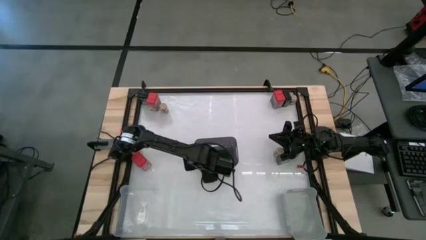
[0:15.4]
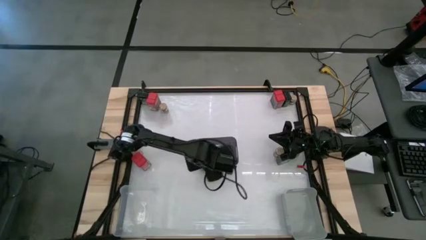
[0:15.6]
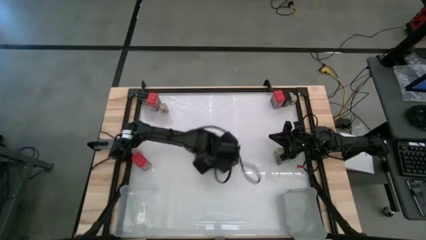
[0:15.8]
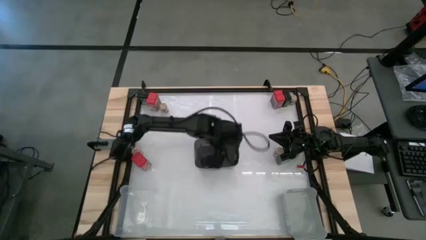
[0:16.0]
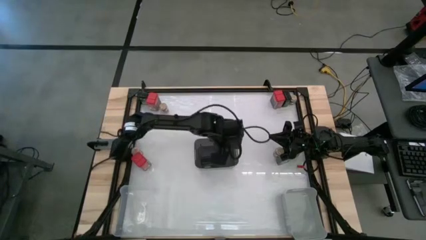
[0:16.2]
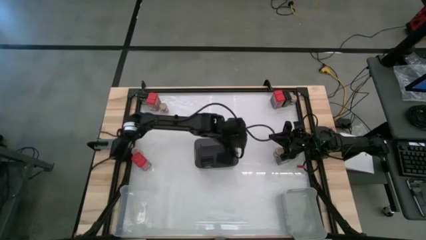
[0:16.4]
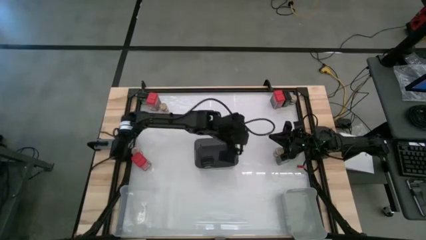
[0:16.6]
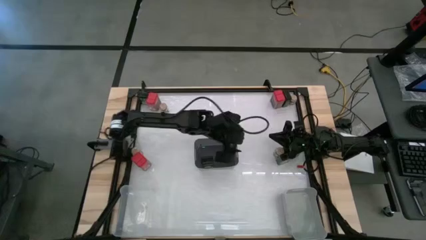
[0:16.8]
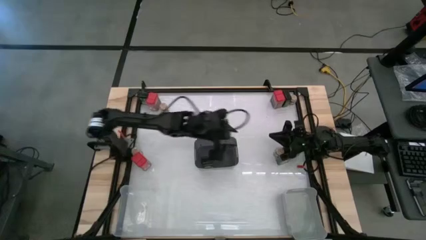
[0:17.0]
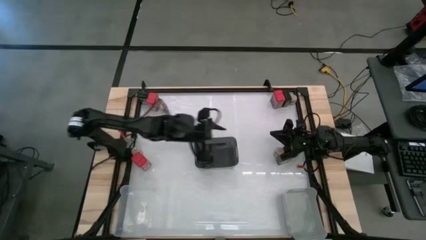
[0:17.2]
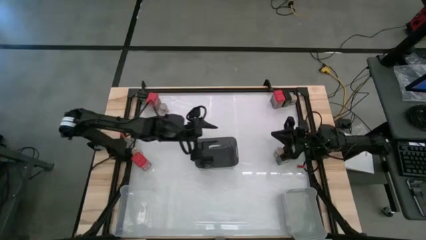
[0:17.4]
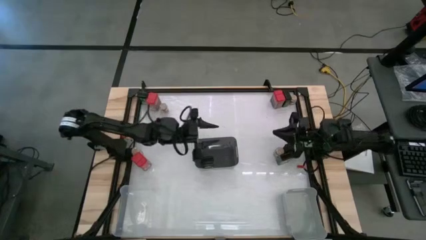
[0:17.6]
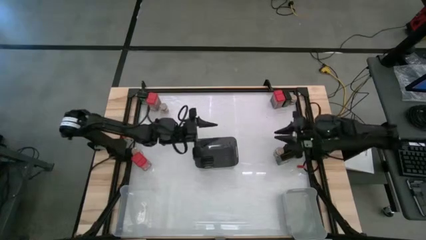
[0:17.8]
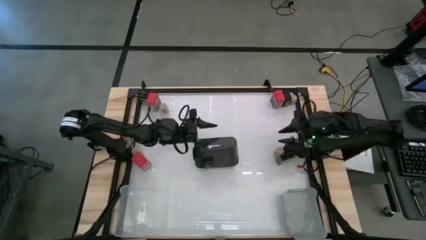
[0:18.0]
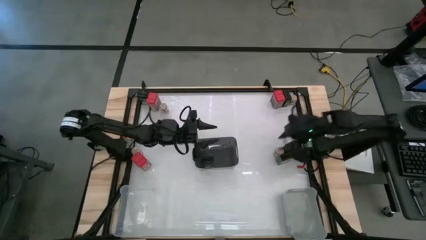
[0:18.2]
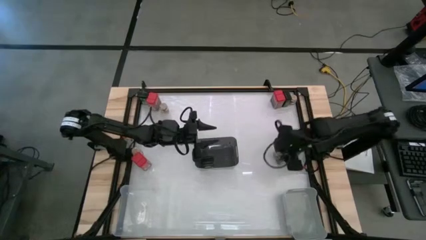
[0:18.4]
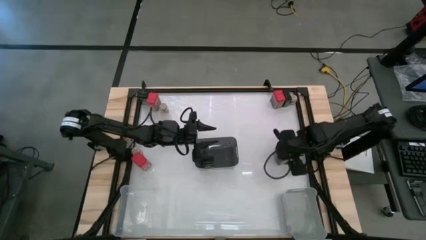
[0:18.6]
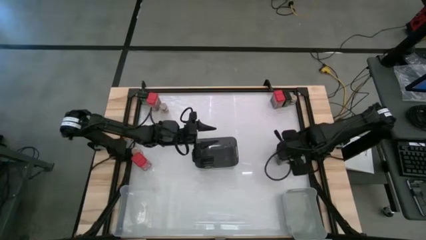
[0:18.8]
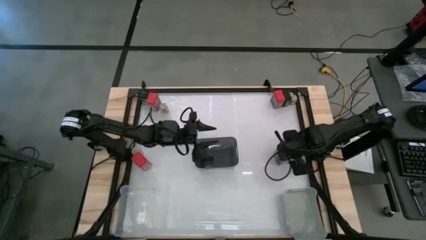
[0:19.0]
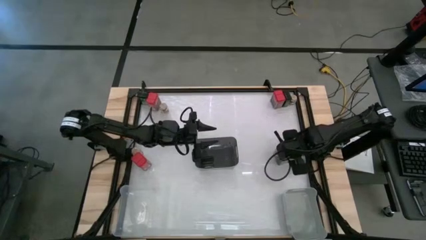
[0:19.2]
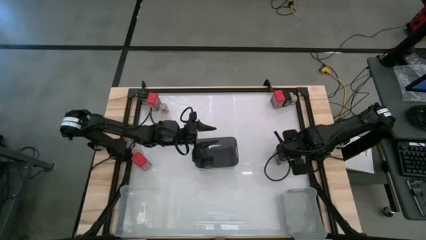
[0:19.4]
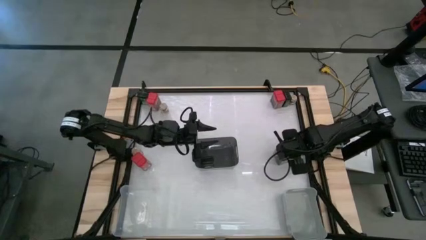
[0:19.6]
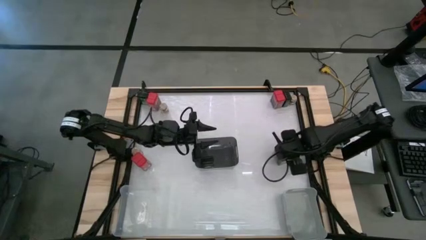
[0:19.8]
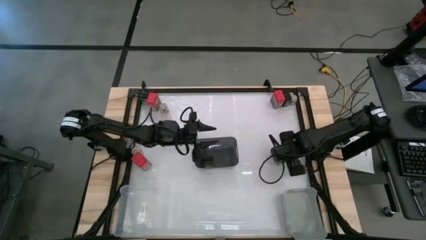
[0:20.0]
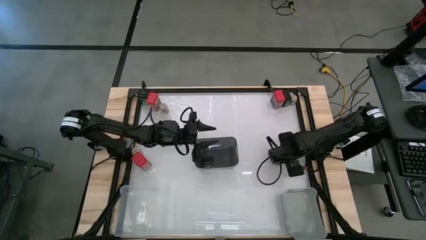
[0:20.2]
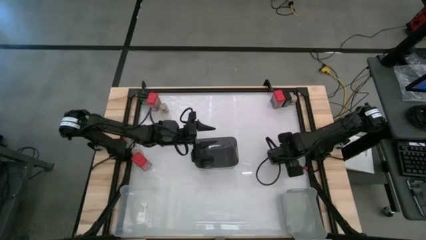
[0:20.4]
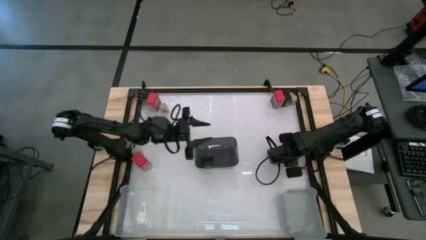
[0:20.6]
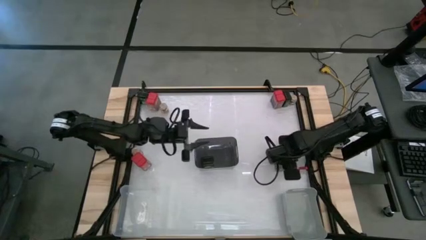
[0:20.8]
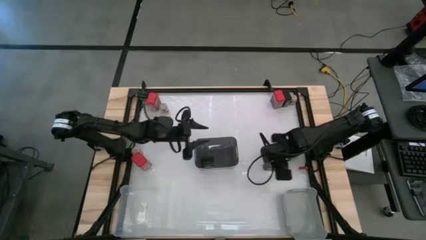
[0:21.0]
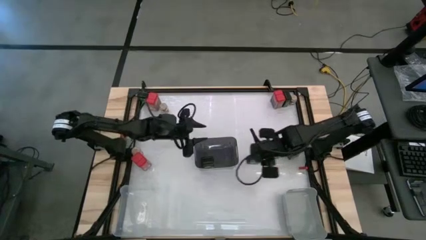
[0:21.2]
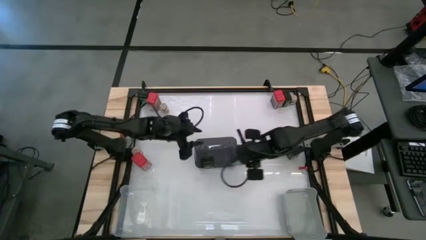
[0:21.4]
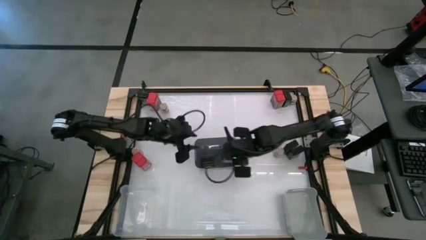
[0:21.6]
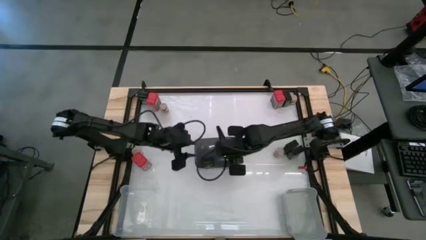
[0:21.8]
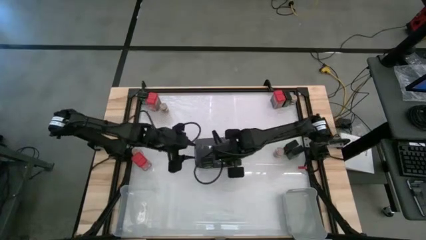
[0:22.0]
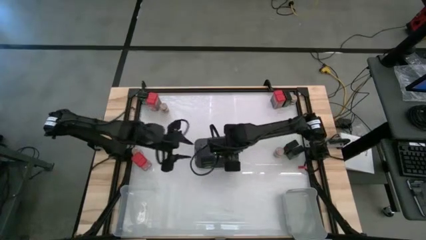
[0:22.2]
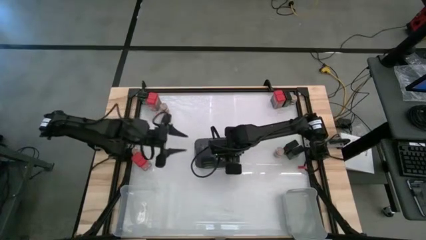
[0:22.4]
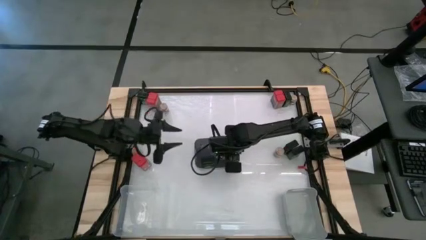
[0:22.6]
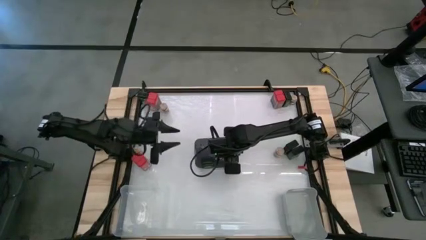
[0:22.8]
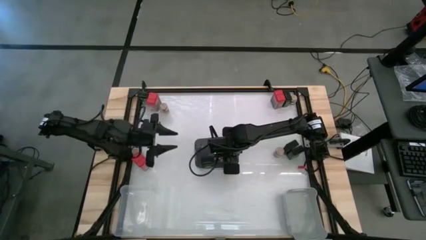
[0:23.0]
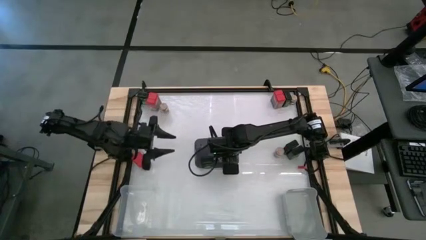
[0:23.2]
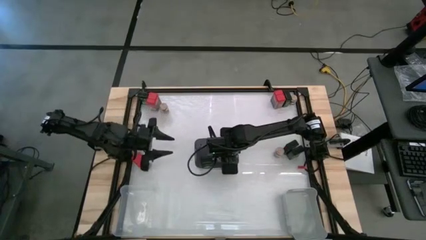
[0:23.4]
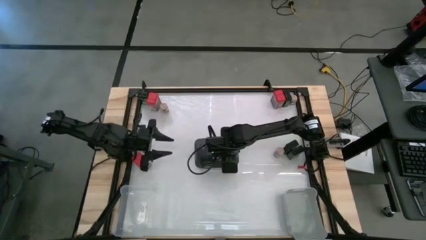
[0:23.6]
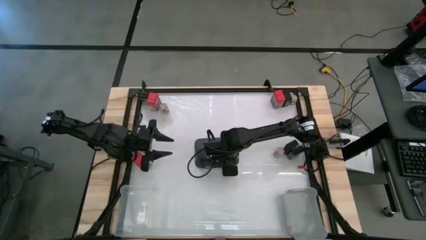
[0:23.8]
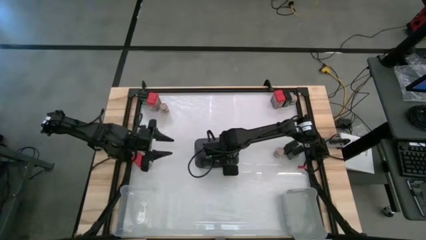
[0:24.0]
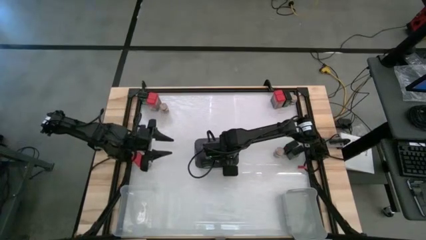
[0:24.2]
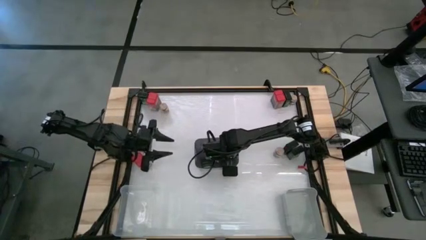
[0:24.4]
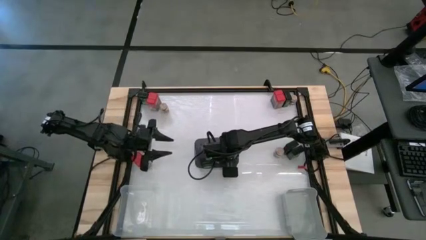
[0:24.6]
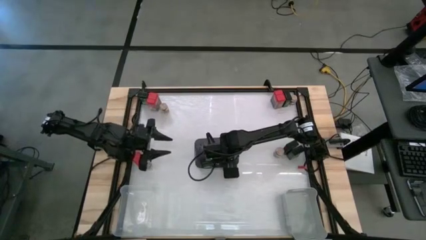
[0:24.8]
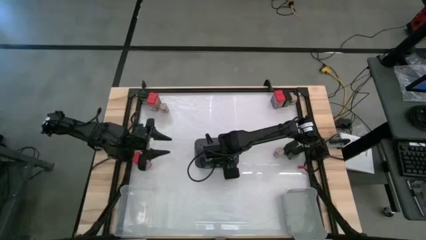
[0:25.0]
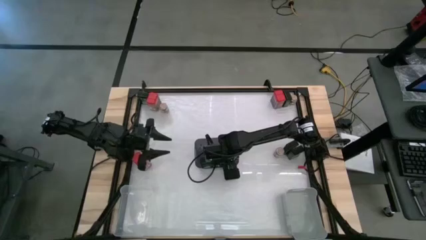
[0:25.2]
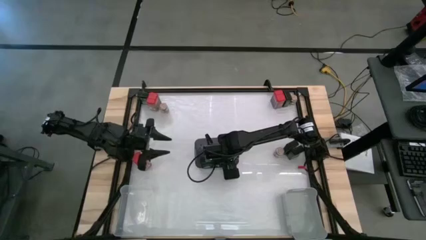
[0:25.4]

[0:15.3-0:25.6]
Task: Sort spices by type
Put the black seasoning can into the black bin

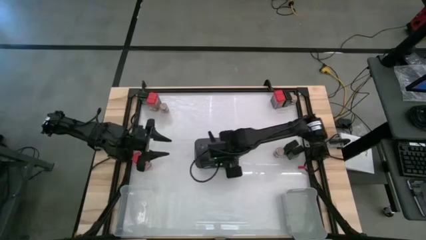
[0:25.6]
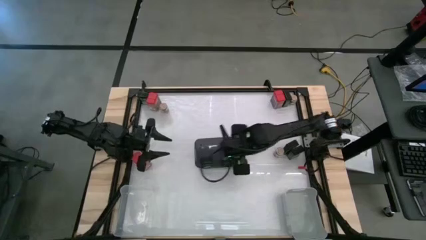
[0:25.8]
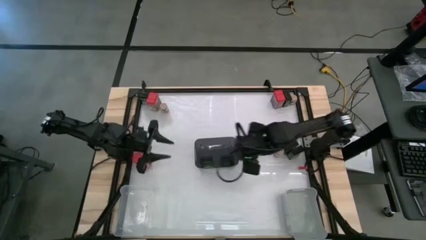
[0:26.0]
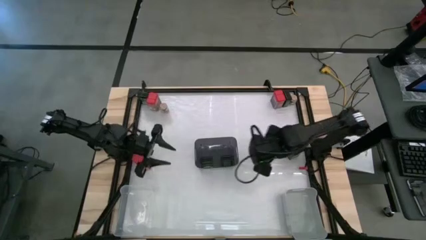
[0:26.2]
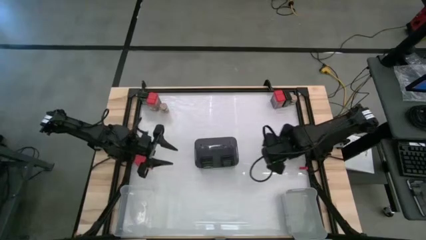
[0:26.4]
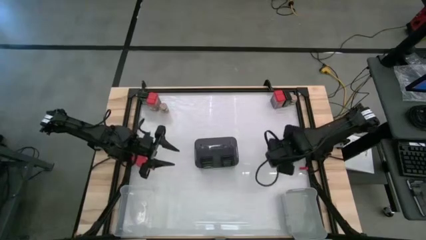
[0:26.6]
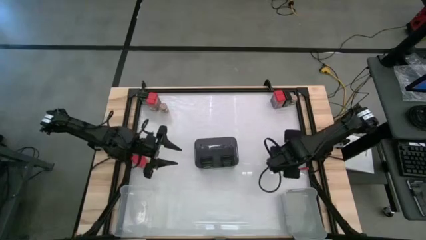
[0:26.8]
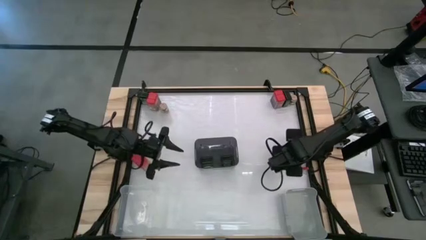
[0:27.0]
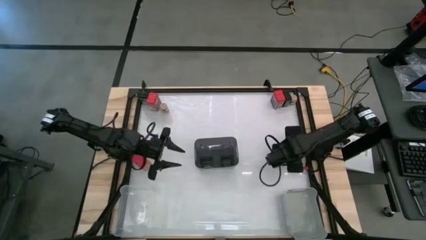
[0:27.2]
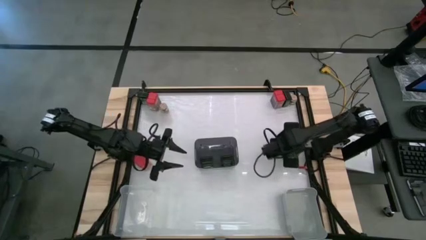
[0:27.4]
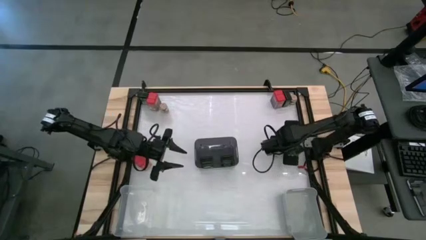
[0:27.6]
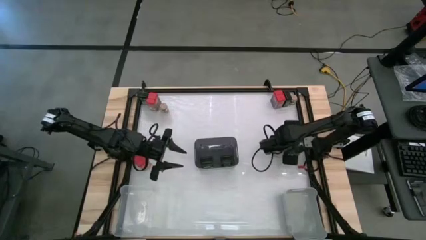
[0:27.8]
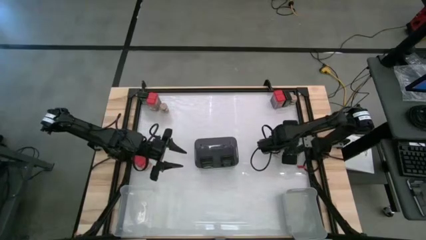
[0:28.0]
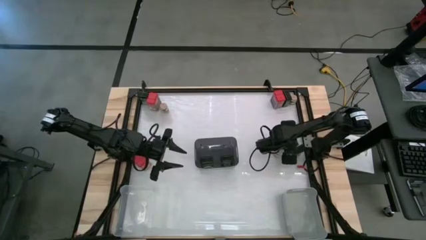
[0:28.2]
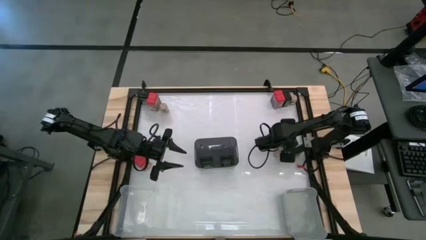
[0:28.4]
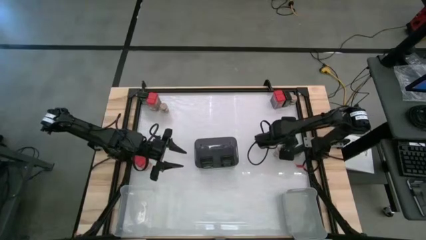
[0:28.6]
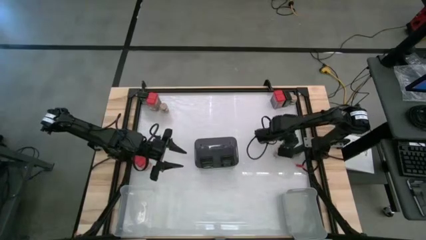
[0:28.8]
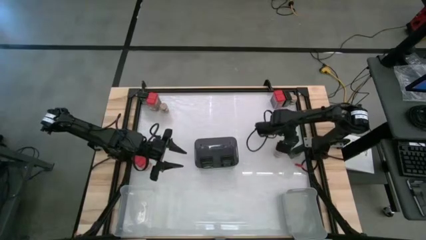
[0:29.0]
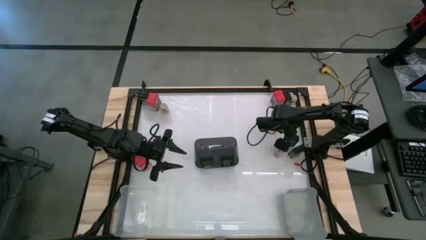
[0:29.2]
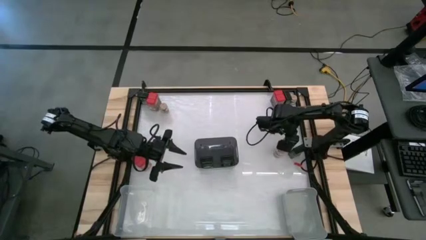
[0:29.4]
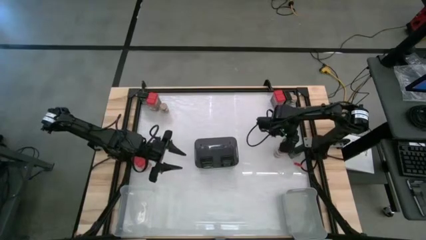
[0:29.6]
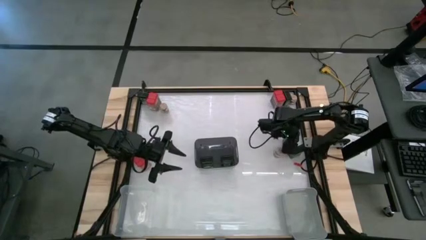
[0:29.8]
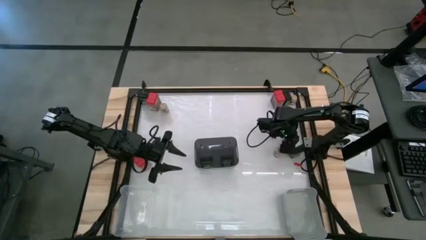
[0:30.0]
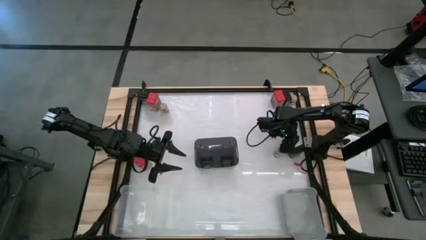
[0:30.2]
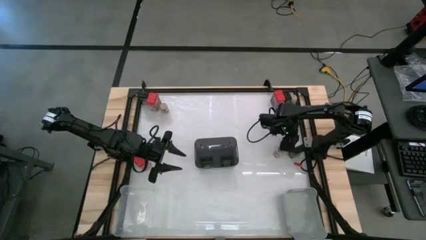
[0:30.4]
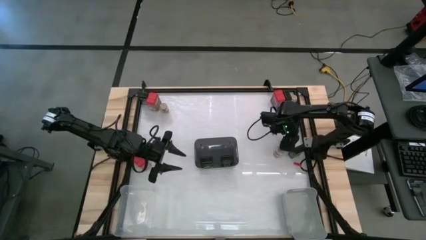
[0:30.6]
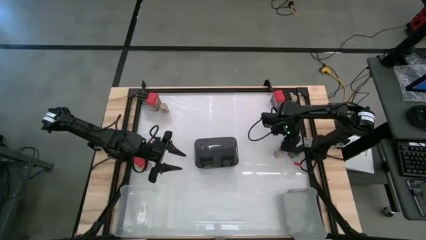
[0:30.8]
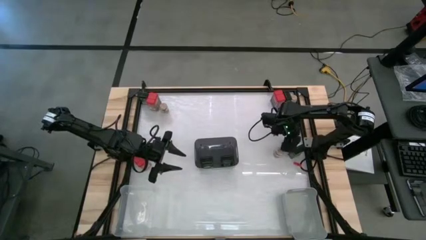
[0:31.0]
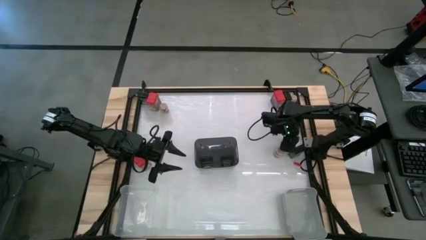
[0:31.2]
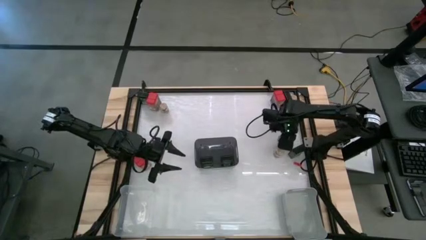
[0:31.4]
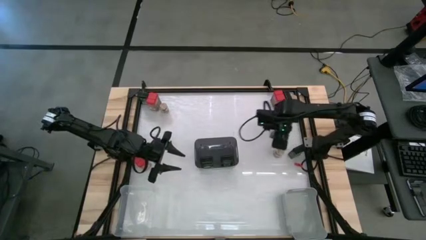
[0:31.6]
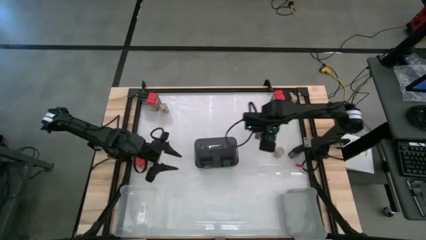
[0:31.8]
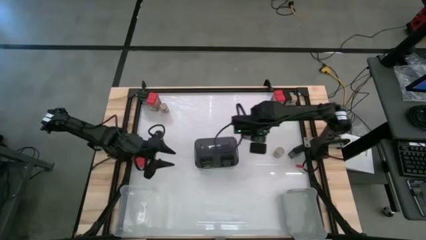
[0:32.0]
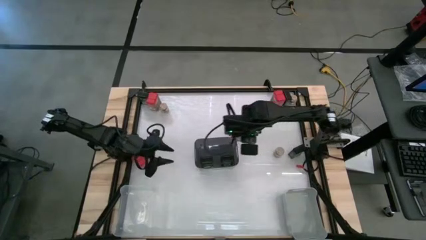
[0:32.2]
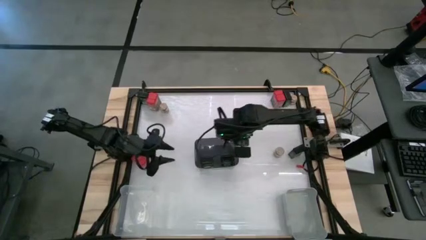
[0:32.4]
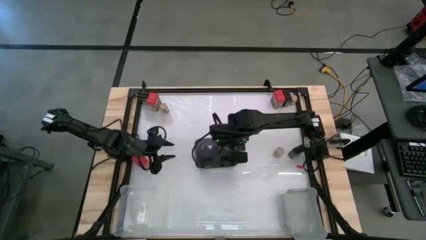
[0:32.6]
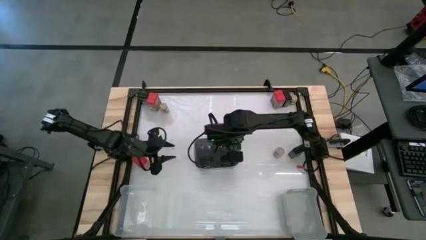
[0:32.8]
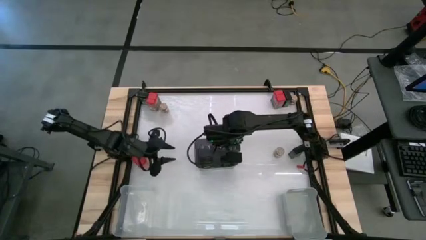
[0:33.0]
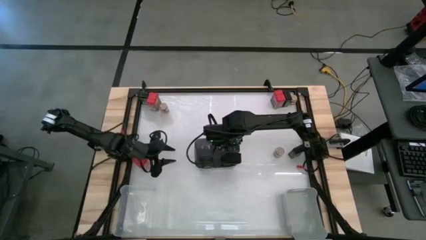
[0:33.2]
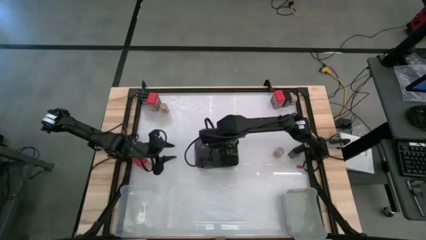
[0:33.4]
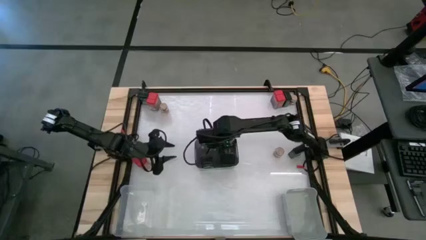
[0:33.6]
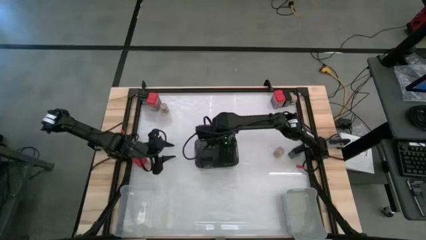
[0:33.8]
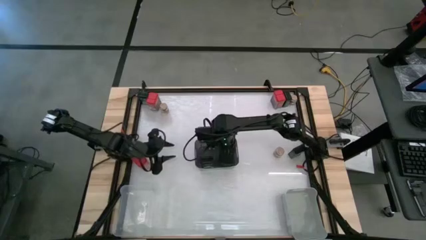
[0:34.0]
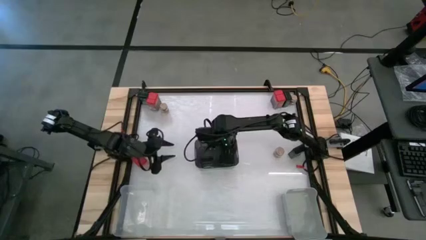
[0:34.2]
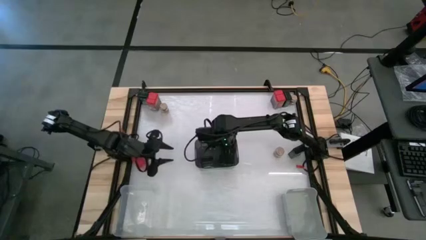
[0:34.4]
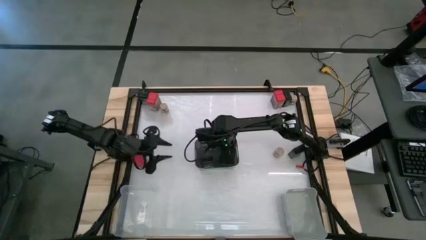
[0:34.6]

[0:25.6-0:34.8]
Put the black seasoning can into the black bin
